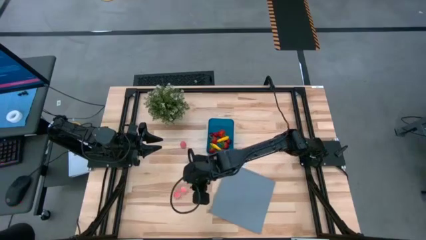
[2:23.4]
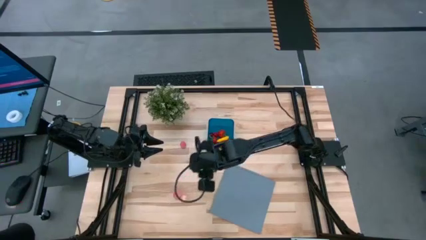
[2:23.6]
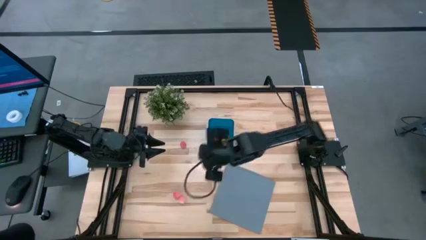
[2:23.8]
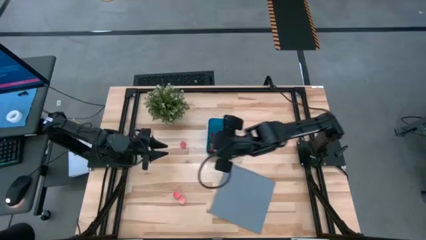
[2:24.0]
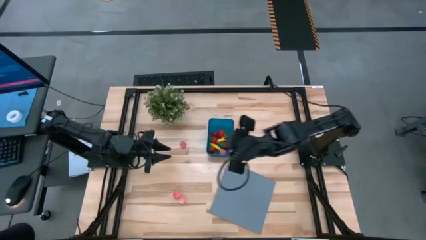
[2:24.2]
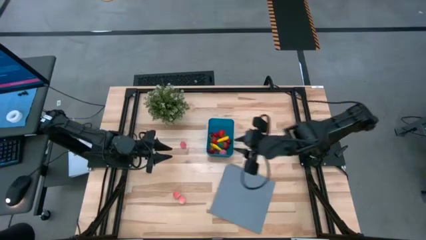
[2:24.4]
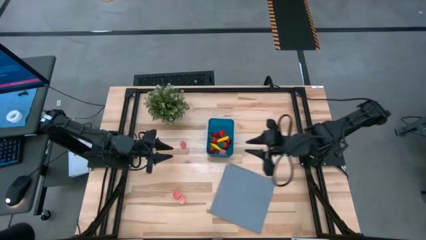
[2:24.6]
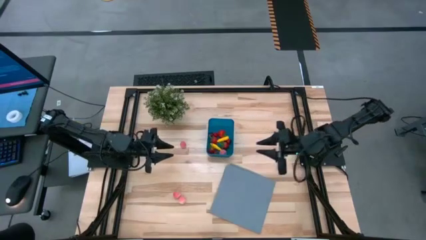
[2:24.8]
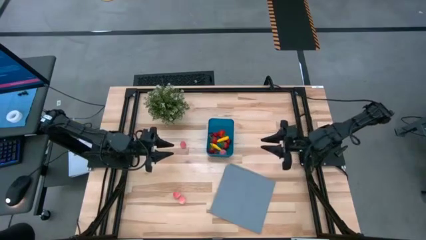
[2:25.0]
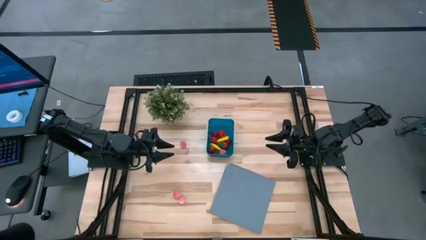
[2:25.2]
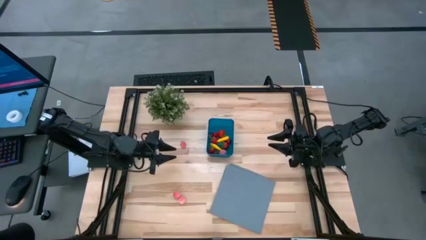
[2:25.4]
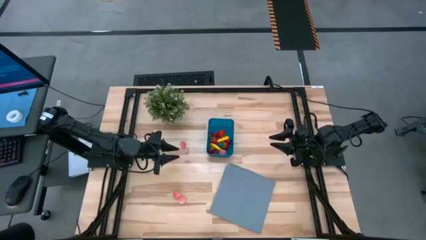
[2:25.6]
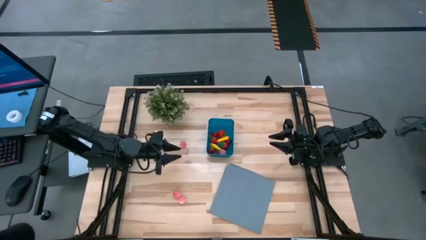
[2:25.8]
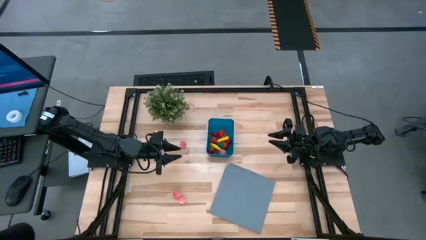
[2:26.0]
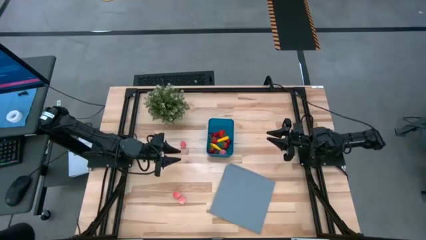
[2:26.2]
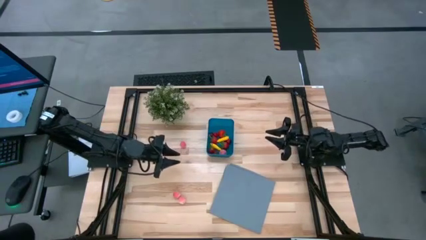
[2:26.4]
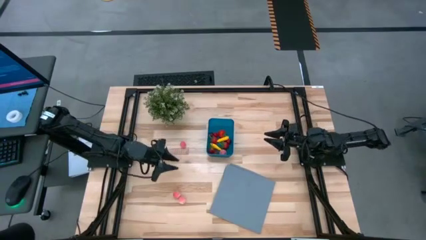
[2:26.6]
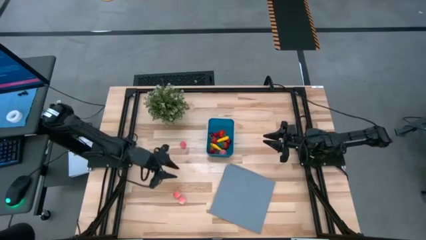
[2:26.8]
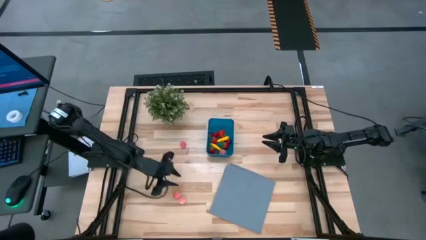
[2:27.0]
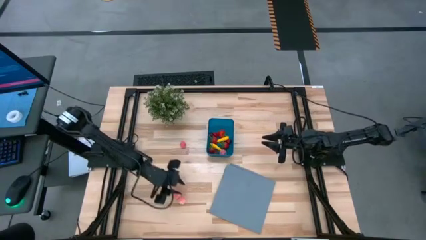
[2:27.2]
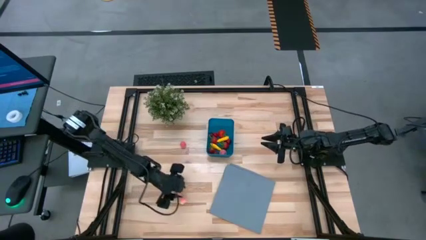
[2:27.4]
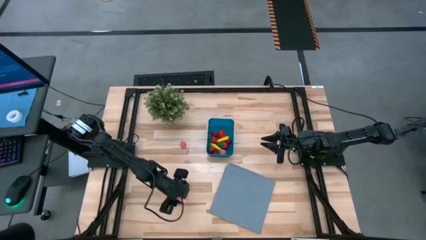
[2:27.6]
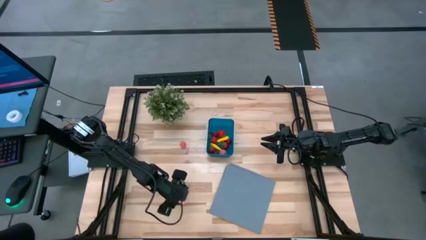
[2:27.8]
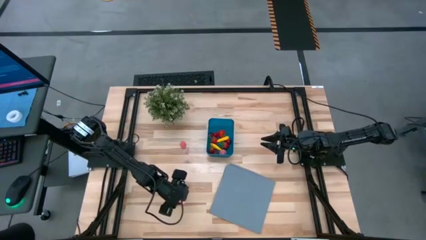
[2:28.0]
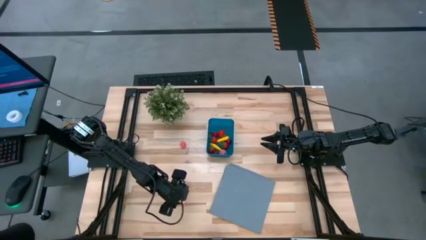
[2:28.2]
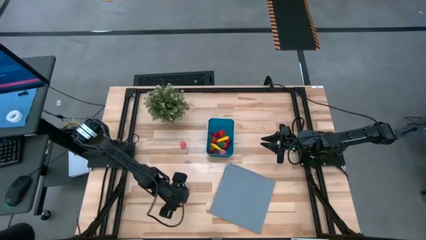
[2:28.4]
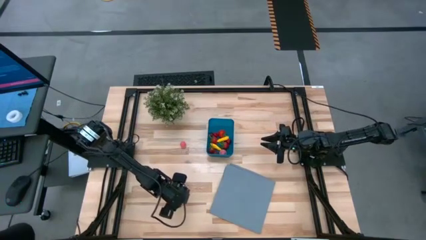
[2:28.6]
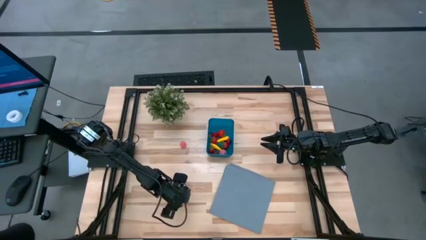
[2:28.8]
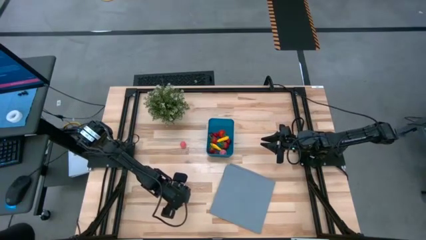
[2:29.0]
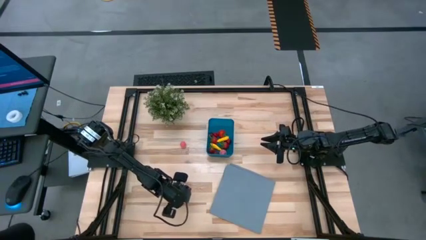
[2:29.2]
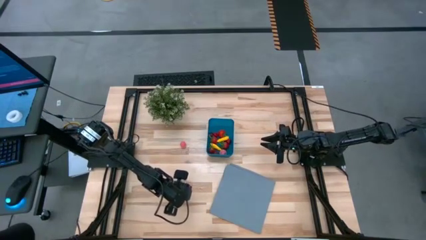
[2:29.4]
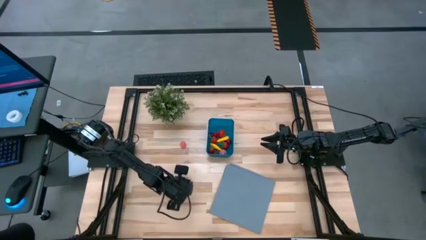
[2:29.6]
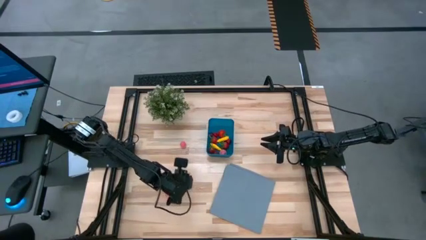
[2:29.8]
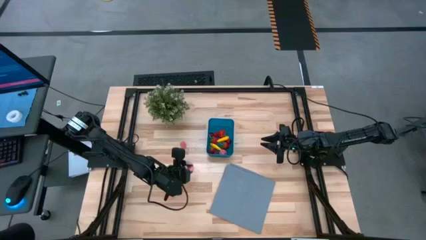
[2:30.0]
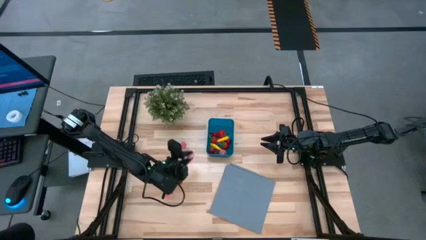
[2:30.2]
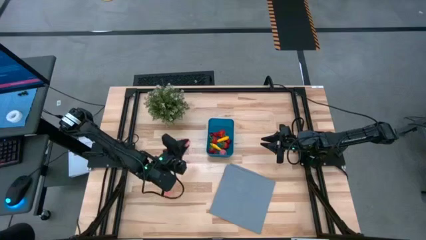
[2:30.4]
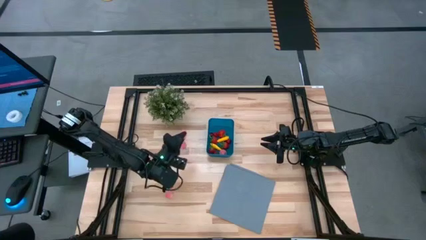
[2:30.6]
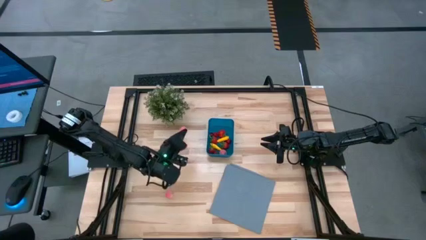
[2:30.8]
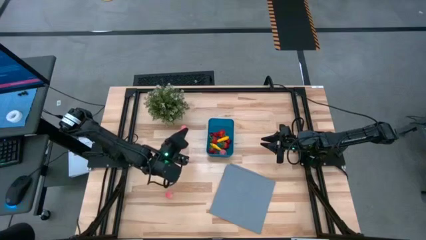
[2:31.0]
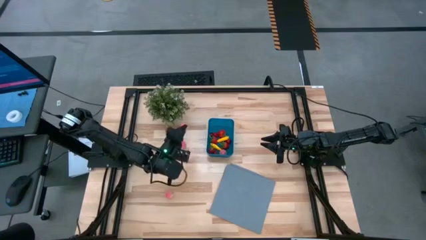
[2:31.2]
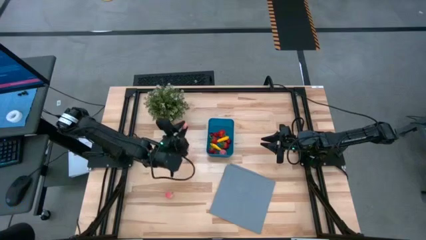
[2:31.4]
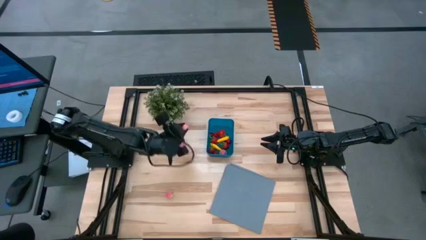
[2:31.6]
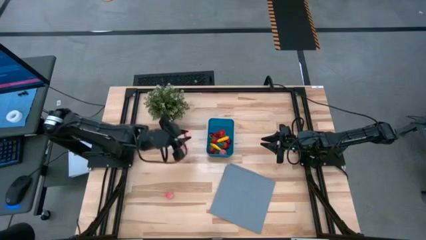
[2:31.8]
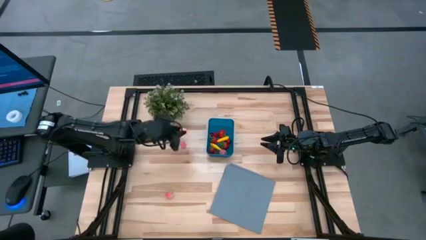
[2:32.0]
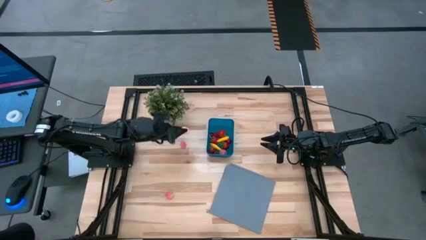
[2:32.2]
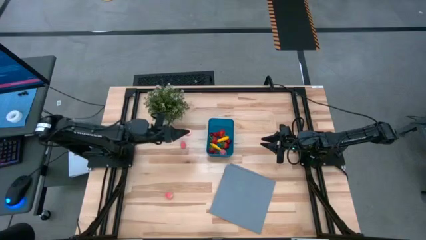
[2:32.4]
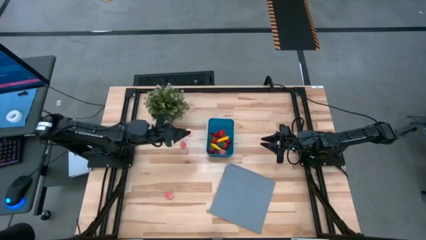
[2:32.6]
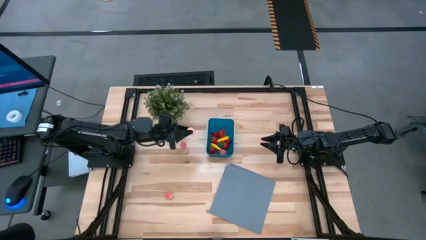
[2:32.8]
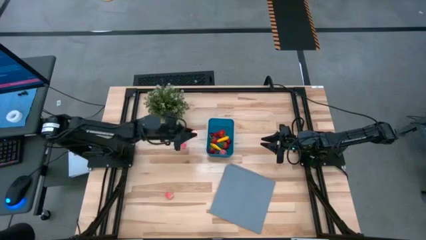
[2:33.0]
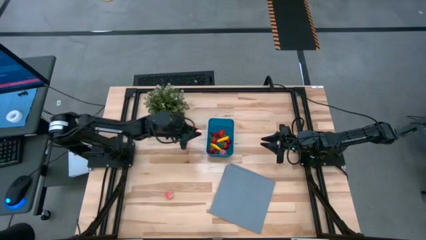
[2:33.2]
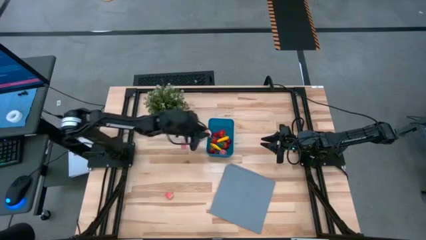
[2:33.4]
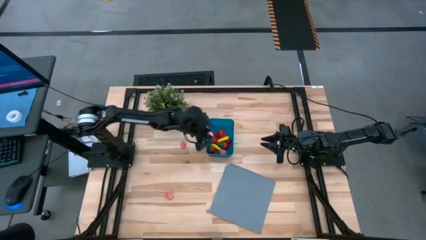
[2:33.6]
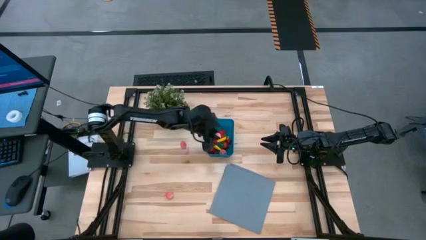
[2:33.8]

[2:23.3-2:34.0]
Task: Pick and placing Produce into tupperware
Put the peach into the blue bin

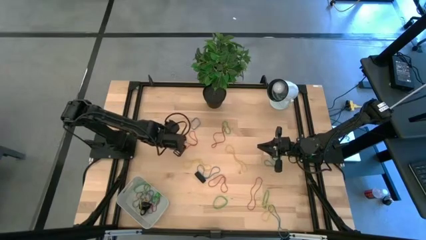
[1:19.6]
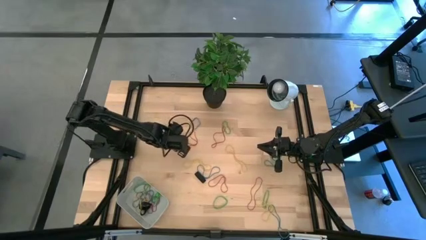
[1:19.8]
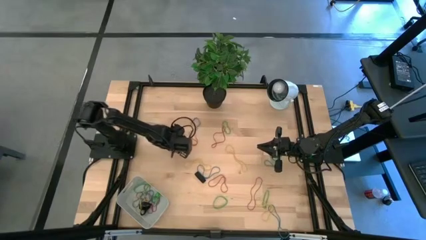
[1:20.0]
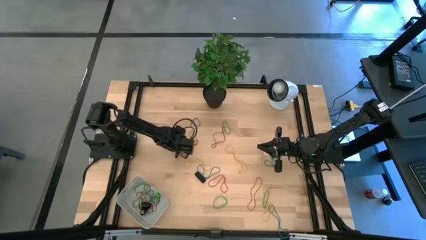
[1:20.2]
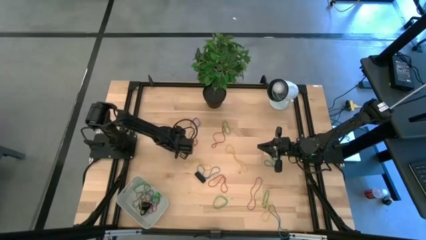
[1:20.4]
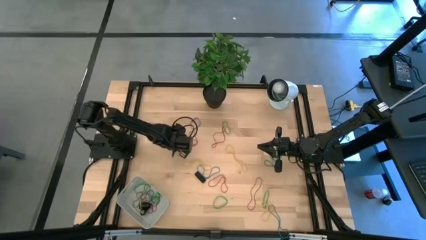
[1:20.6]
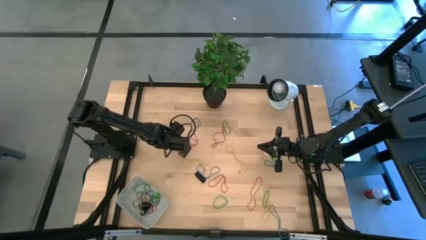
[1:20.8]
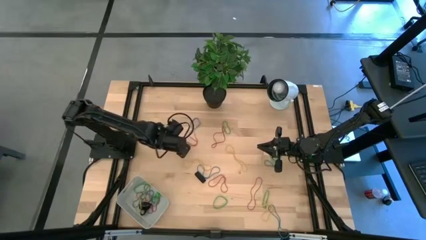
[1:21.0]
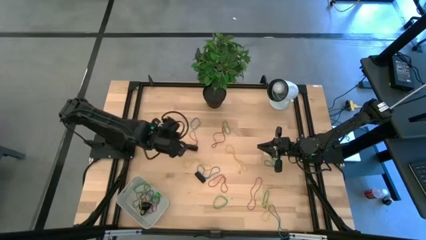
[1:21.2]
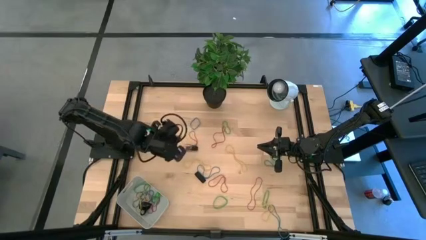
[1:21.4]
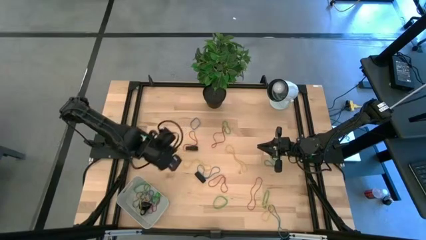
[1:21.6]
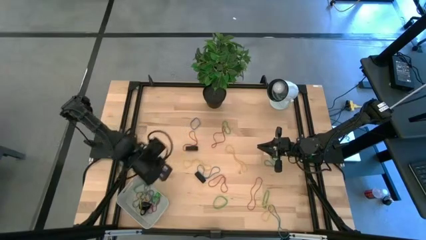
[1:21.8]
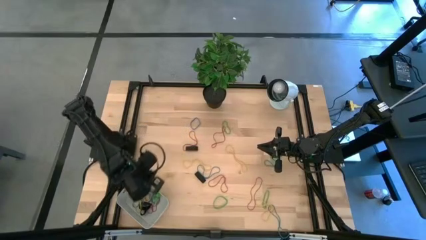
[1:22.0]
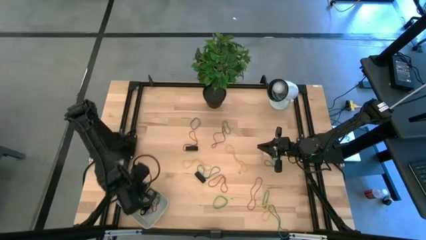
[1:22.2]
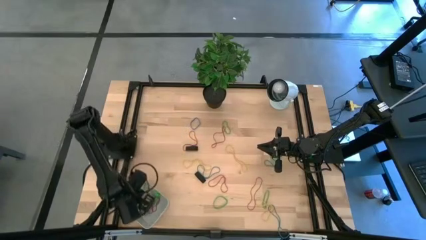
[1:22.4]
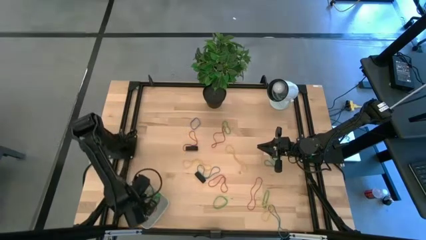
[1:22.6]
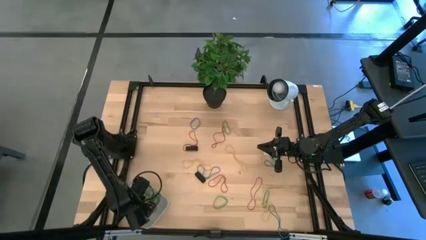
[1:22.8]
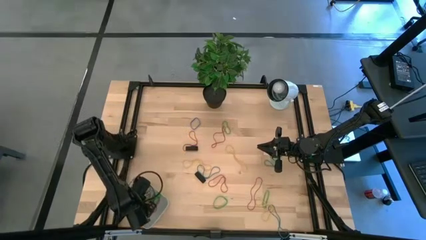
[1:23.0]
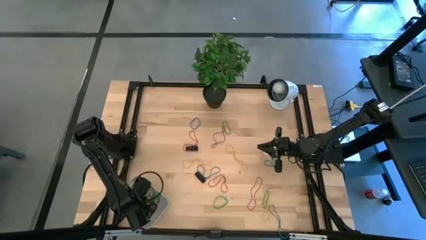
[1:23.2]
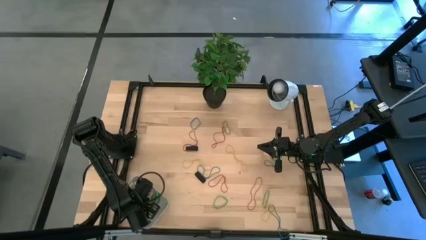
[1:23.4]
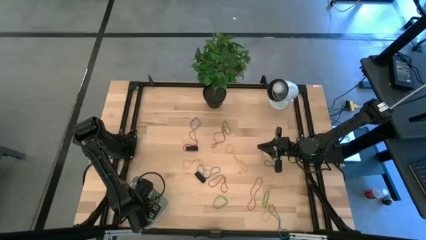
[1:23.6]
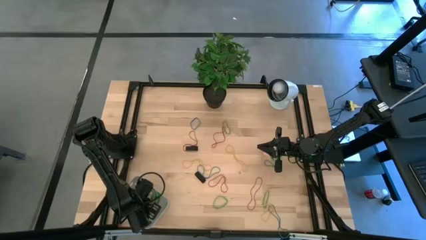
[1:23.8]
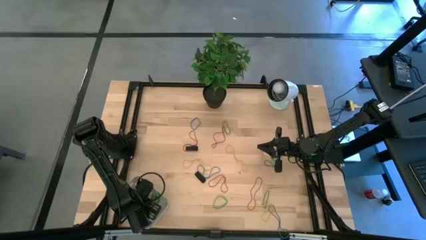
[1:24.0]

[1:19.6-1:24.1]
Task: Pick and place rubber bands into bin
Put the yellow rubber band into the gray bin

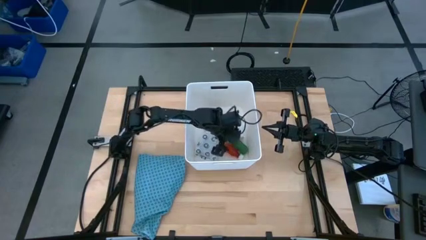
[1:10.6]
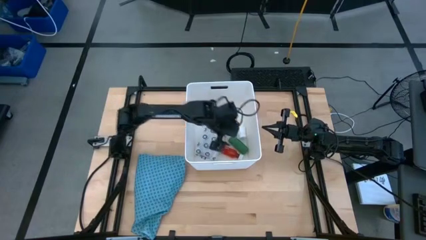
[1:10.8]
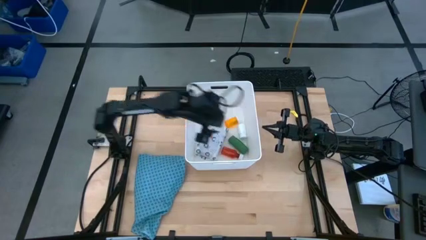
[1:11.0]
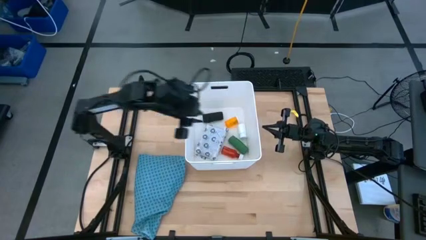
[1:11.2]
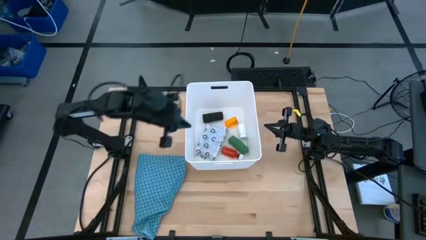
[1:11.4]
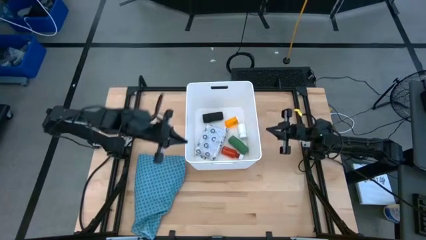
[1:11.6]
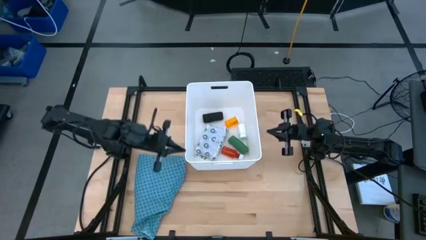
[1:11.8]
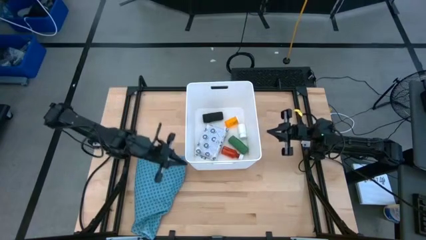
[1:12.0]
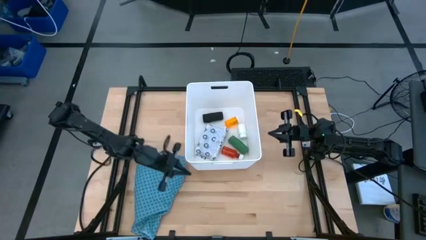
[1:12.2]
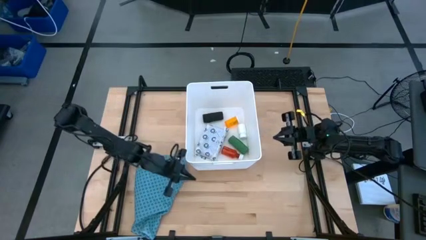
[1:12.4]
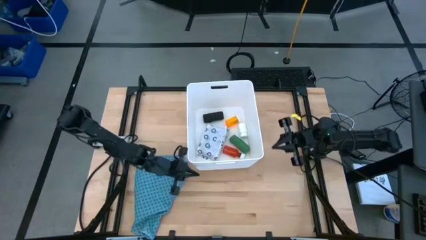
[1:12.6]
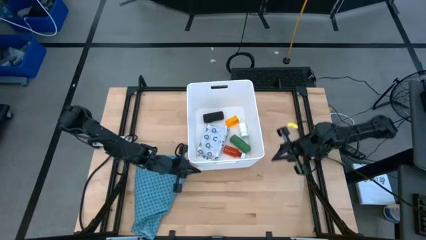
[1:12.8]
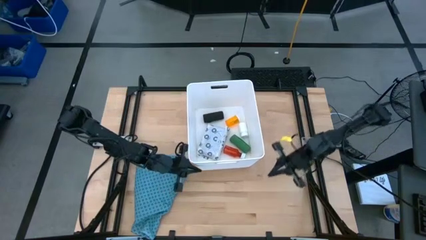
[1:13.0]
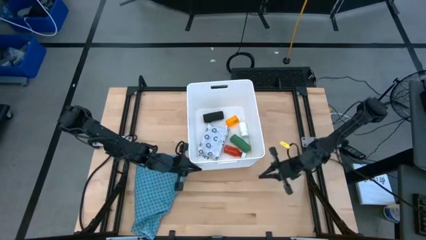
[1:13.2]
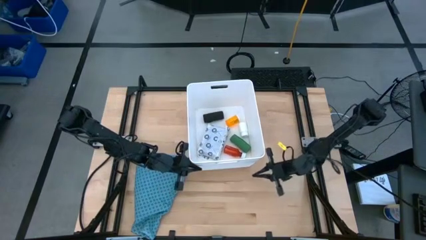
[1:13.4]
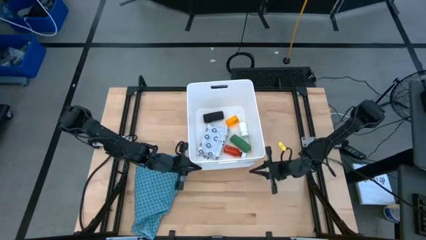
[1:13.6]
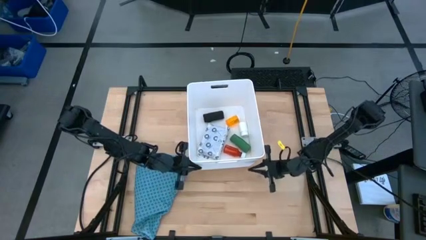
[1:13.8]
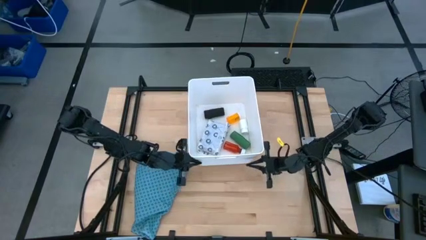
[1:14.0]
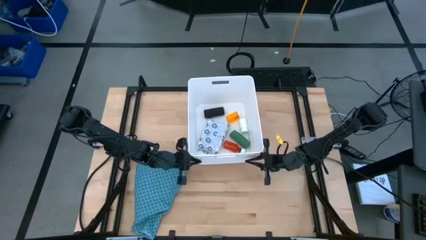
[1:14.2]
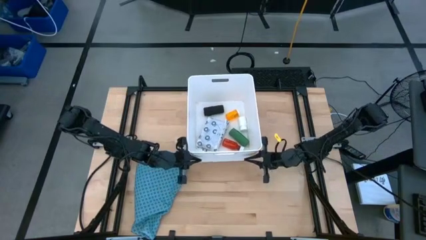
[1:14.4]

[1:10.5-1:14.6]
Task: Pick & place medical supplies in basket/bin
Adjust the white bin
